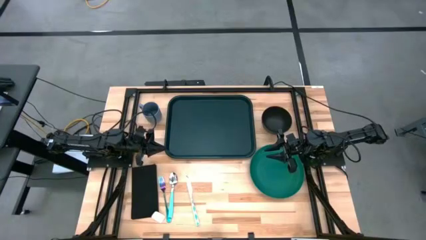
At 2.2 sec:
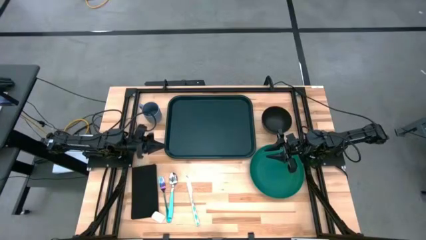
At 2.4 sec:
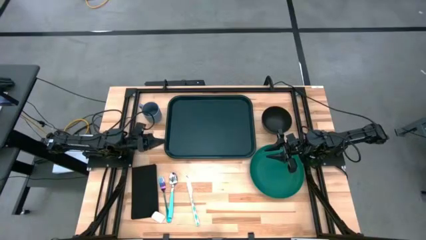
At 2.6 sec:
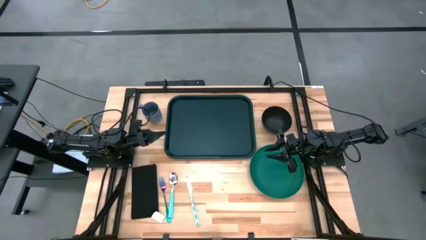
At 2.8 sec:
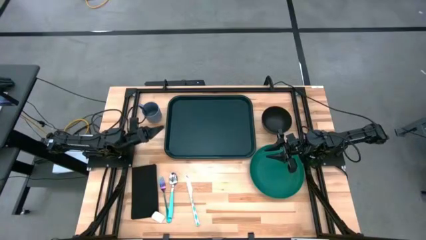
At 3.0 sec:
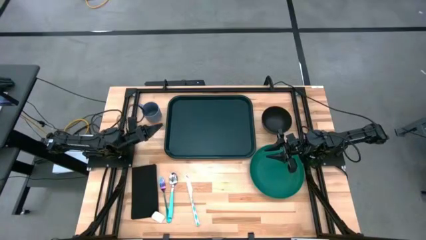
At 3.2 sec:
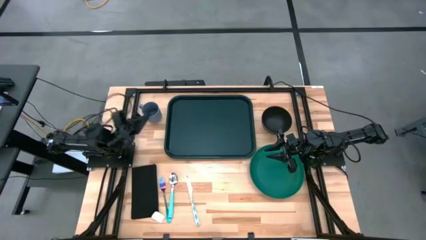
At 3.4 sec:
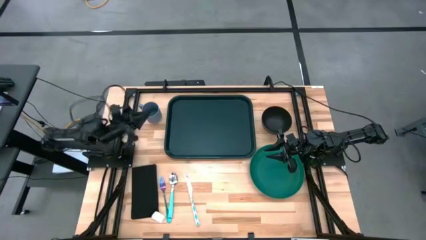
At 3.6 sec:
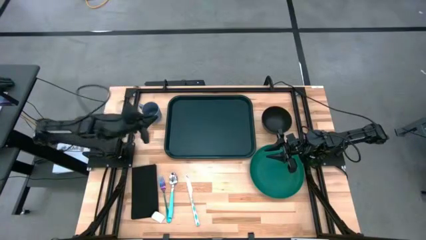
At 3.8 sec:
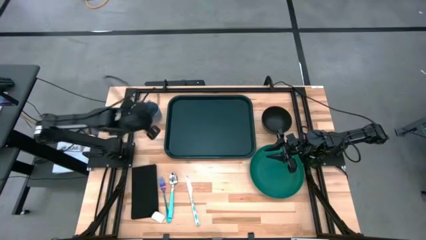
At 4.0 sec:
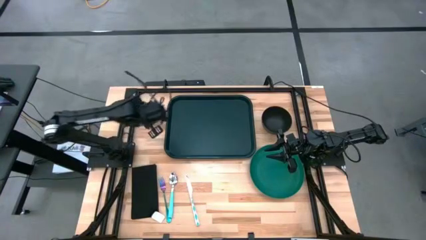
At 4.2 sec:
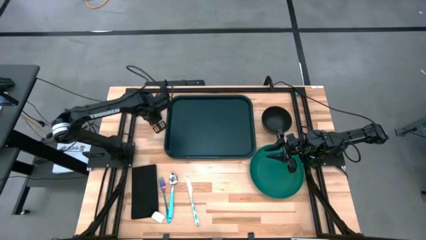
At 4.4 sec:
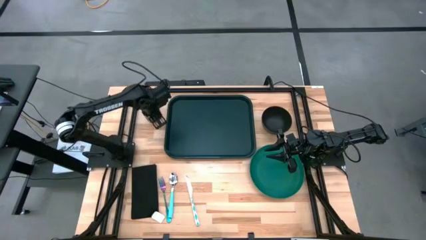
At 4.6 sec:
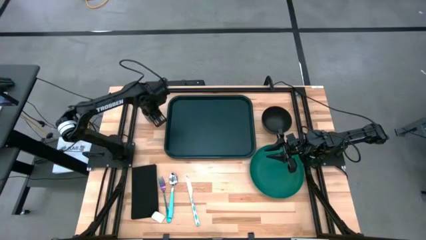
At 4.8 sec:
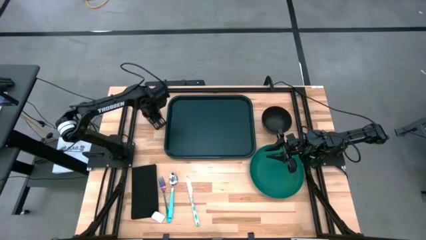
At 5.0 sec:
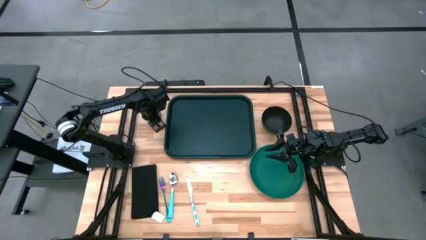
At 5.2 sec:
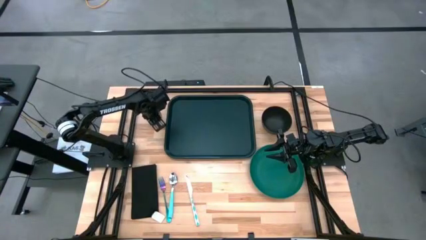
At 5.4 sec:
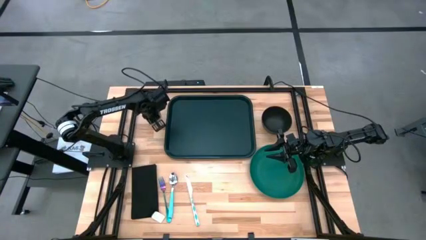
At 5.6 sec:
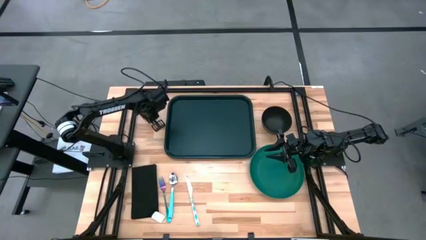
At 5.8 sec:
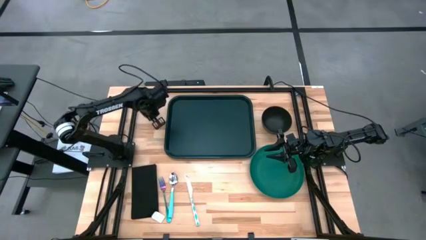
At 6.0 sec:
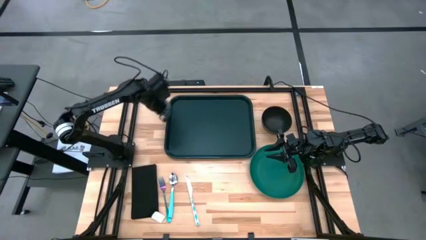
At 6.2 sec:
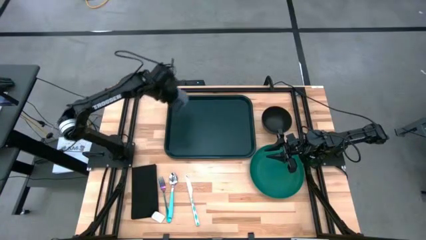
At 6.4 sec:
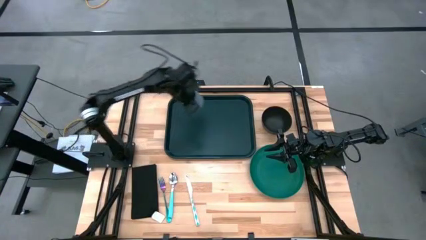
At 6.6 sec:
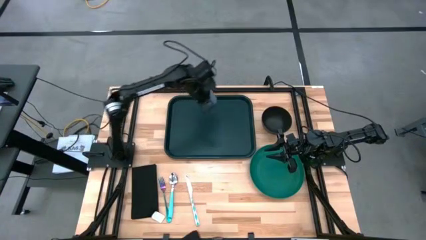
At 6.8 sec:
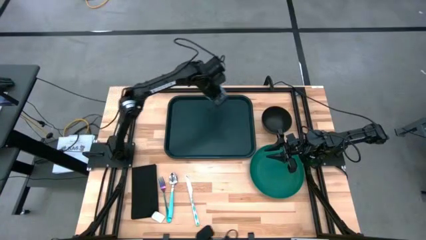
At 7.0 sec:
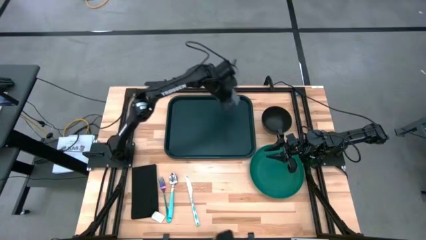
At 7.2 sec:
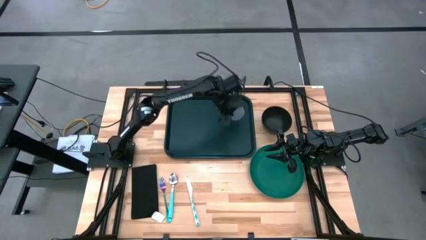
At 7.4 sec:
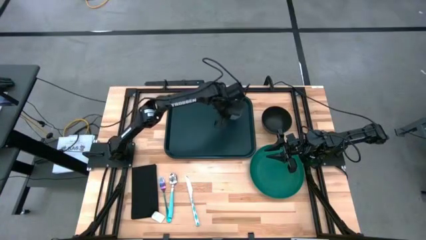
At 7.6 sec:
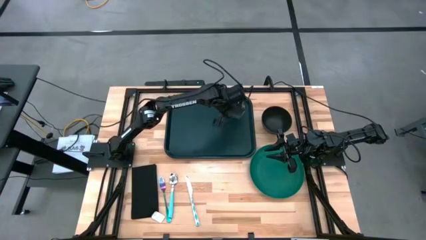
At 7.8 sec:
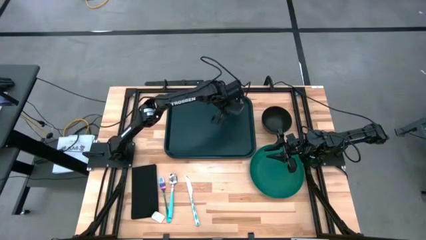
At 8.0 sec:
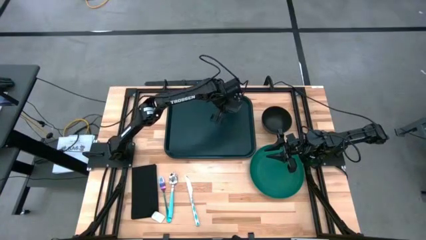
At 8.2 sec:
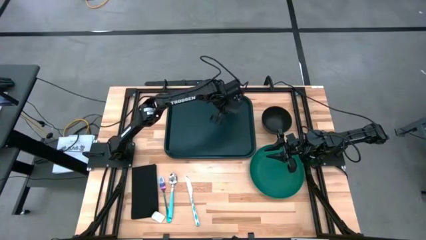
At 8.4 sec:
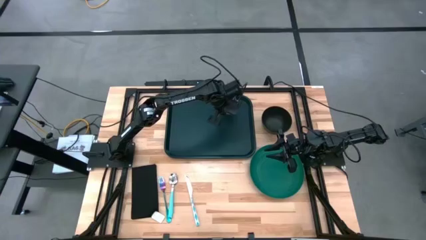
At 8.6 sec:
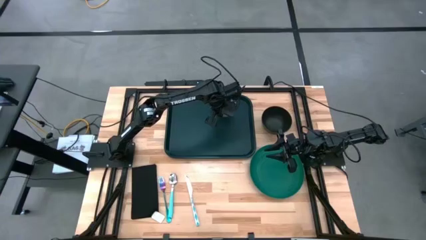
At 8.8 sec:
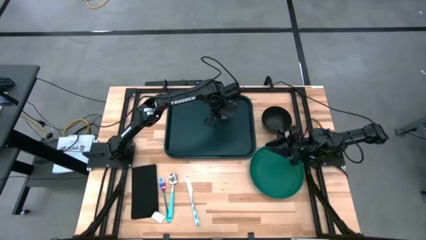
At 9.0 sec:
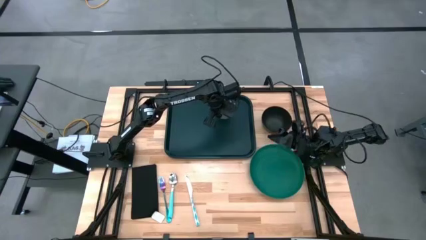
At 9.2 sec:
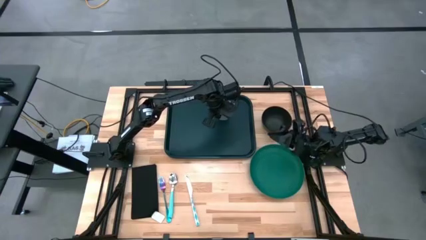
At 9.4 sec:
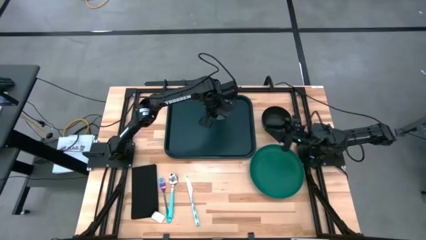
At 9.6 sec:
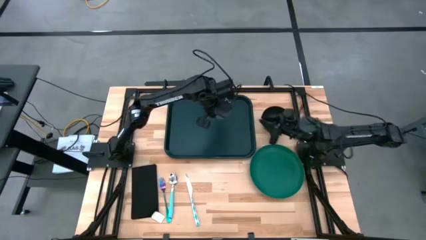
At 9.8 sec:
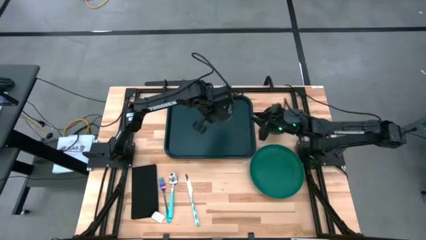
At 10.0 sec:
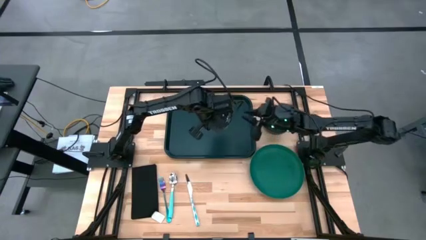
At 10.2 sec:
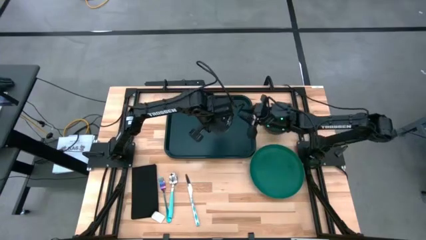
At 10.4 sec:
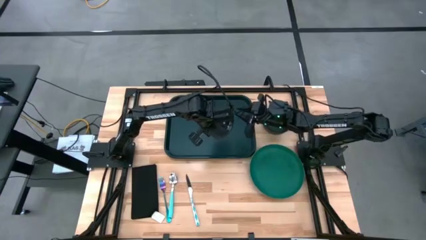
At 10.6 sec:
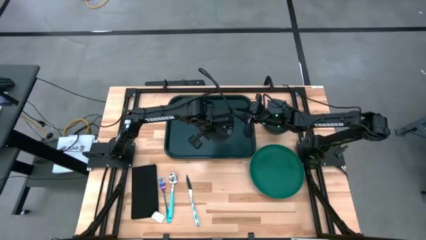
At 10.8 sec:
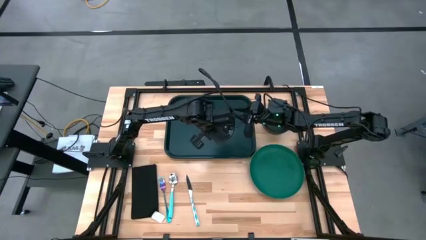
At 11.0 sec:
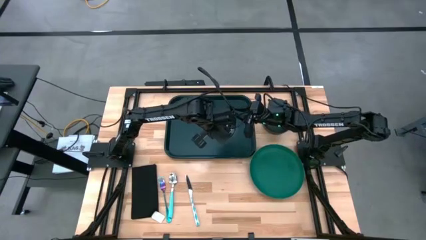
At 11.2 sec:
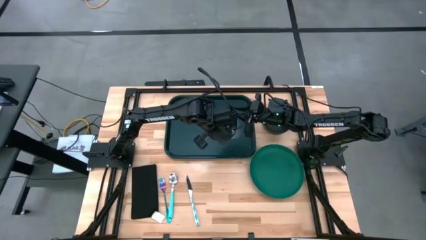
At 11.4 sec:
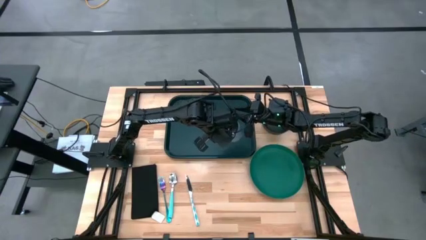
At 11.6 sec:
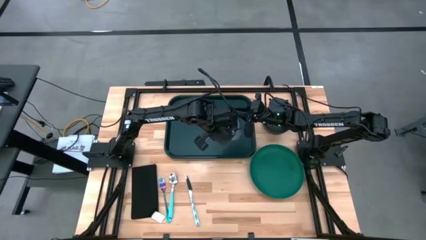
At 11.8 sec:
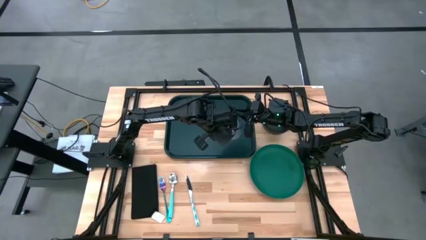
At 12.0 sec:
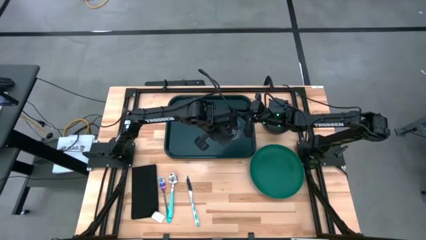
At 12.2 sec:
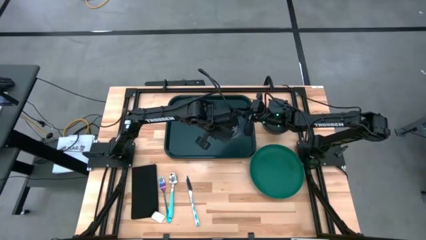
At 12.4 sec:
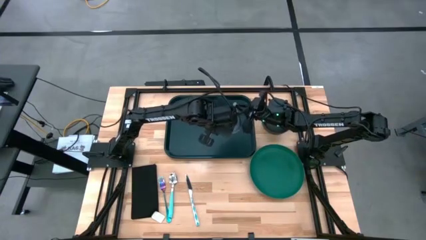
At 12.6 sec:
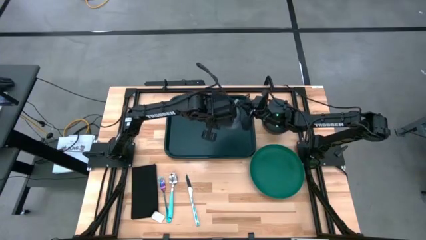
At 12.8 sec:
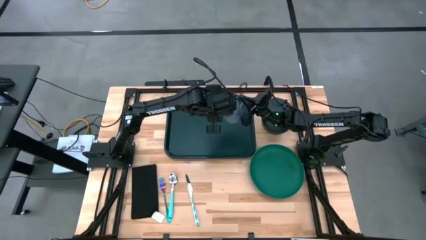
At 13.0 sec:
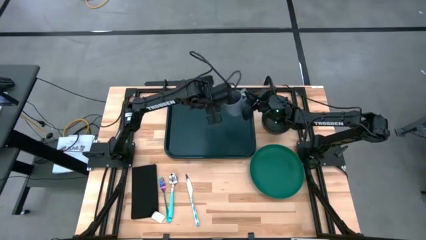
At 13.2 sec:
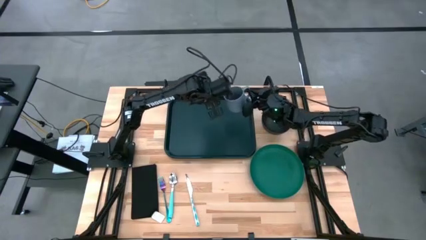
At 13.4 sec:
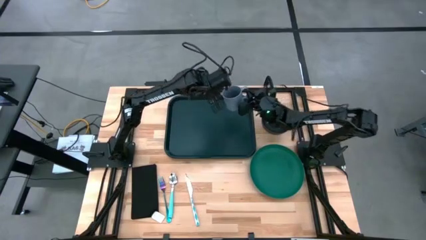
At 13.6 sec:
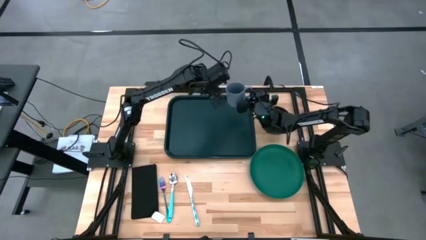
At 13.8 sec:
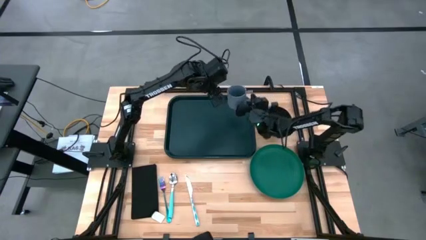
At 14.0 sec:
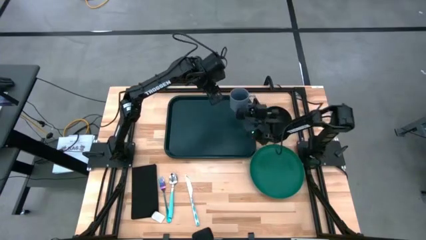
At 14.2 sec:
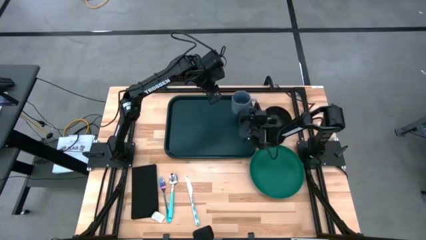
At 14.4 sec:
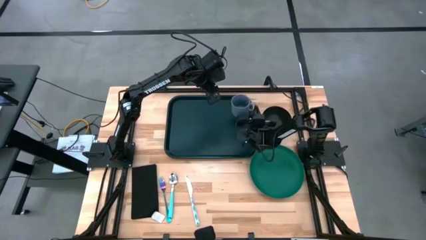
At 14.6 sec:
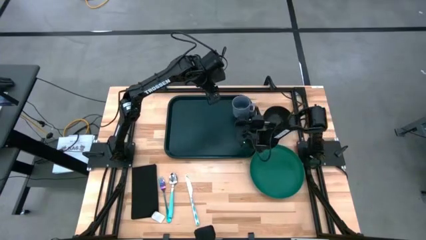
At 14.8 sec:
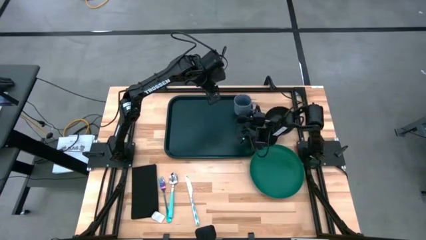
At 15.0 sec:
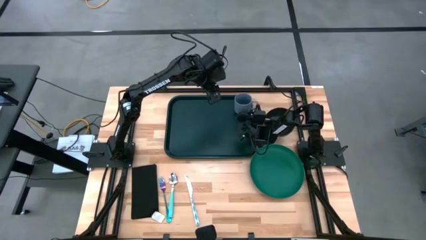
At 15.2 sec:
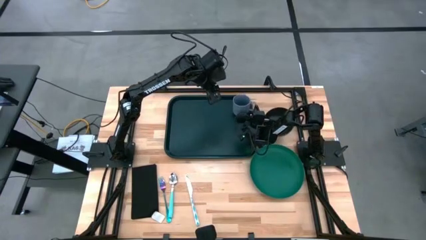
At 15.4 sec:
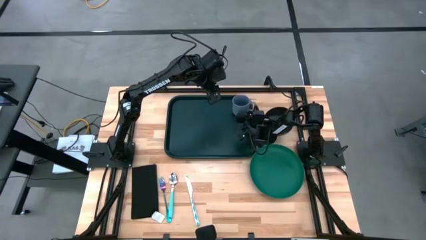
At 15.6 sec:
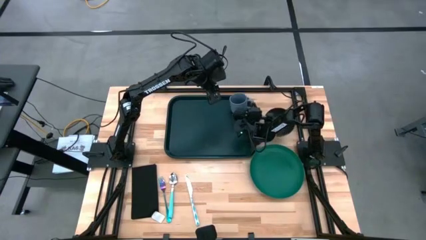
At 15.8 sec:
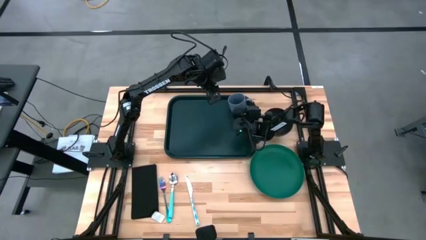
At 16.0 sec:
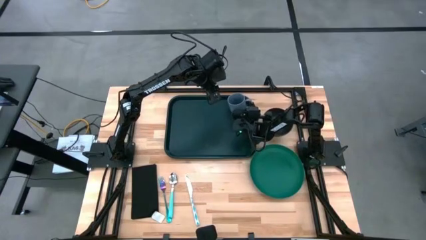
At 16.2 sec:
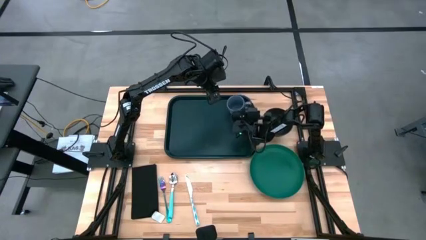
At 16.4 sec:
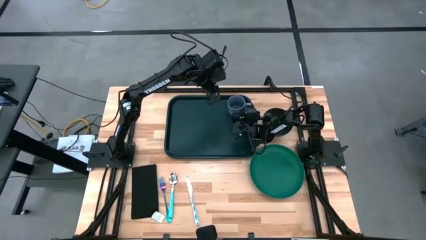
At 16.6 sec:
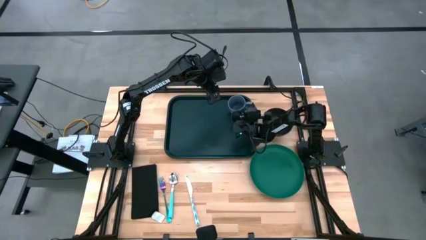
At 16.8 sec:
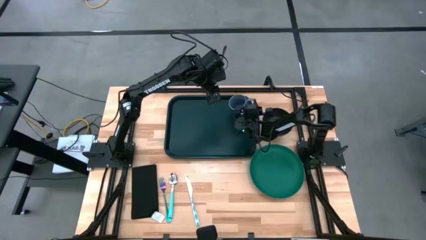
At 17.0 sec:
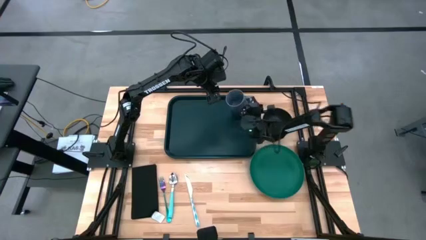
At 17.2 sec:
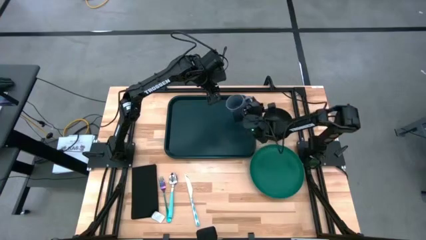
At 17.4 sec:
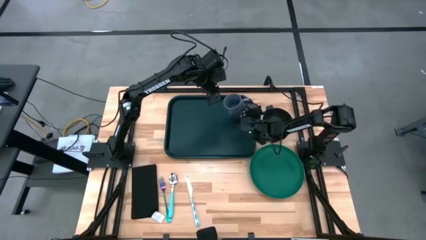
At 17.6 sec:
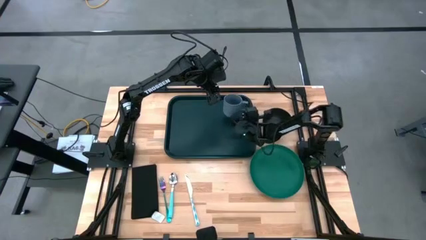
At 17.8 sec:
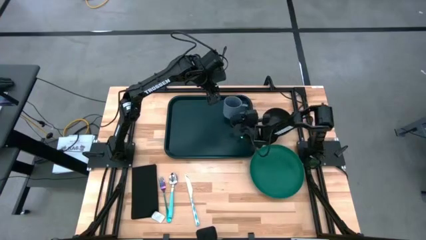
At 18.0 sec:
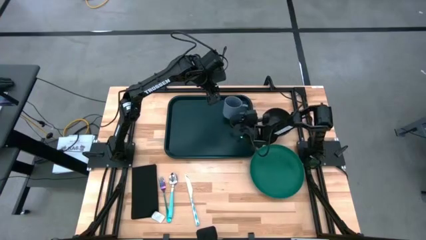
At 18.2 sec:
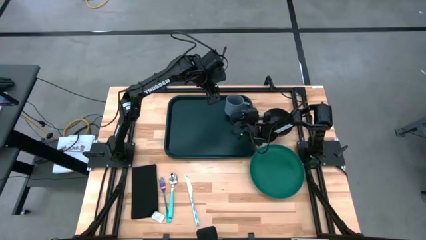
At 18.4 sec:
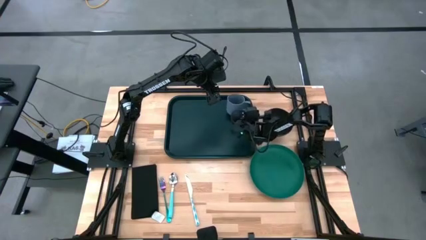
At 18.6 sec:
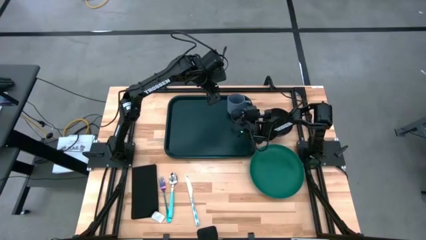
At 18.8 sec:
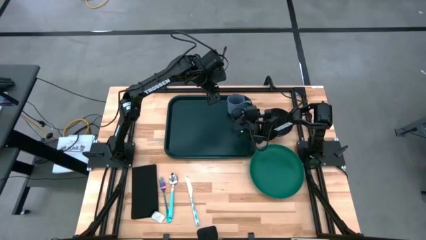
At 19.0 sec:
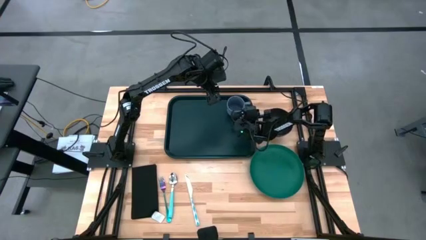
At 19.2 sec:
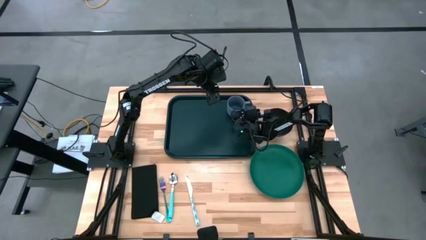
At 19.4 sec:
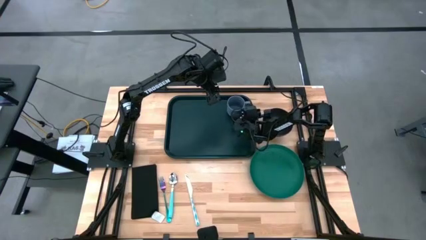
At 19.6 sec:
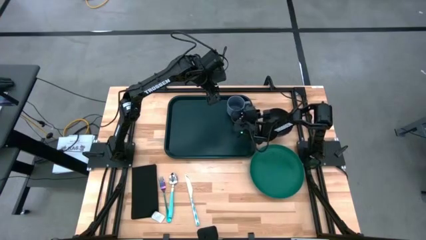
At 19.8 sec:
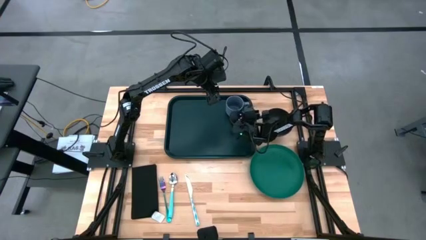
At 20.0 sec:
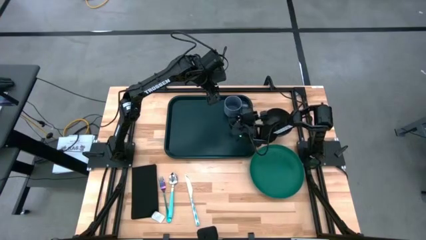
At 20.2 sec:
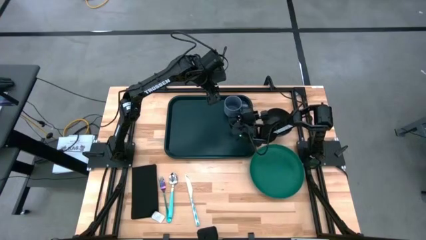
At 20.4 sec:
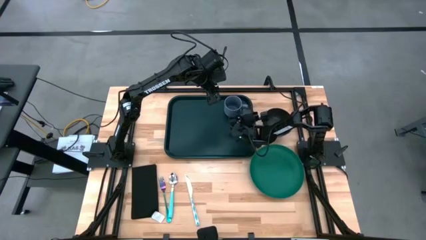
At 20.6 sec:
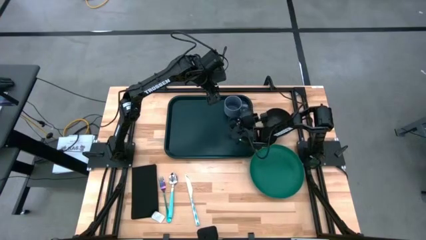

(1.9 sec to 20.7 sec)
Task: Set up tray
Put the gray cup on the black serving tray
